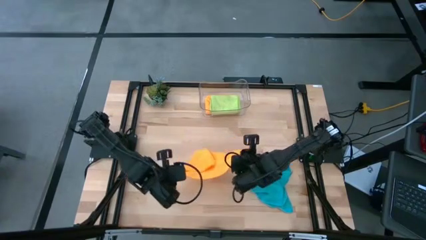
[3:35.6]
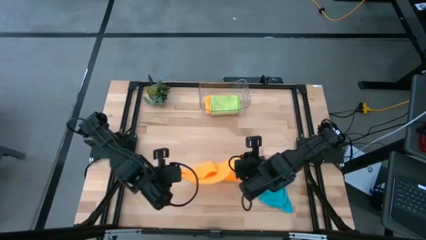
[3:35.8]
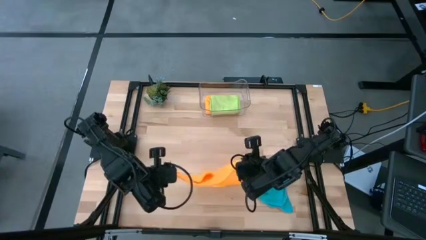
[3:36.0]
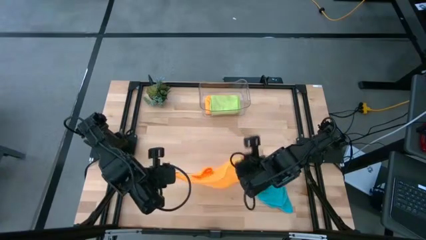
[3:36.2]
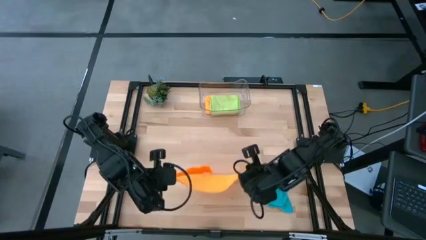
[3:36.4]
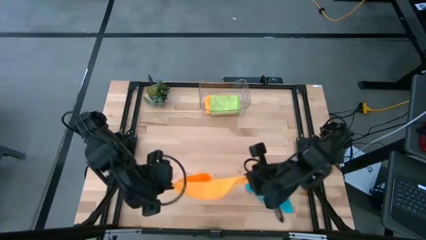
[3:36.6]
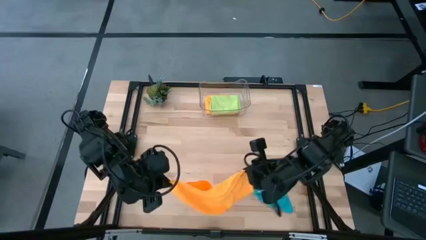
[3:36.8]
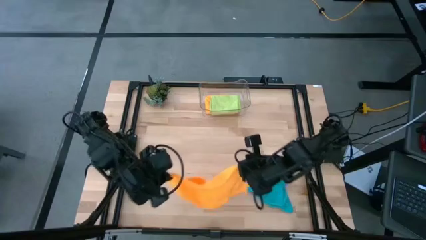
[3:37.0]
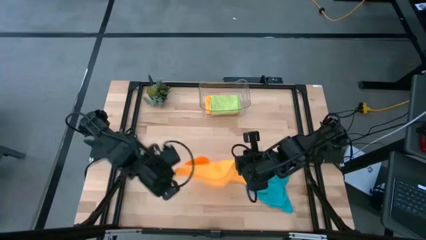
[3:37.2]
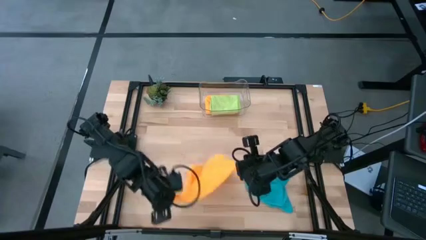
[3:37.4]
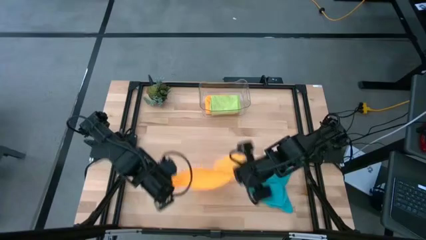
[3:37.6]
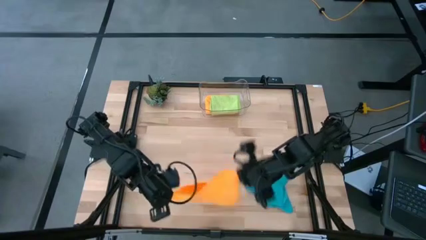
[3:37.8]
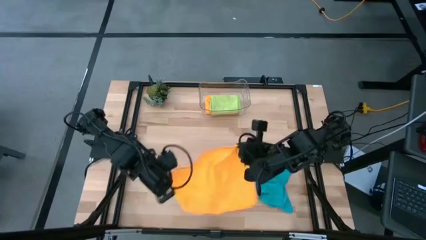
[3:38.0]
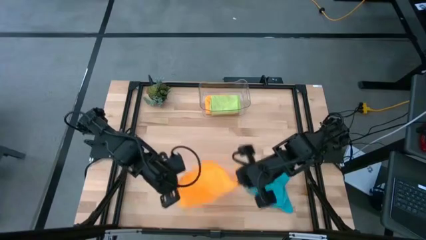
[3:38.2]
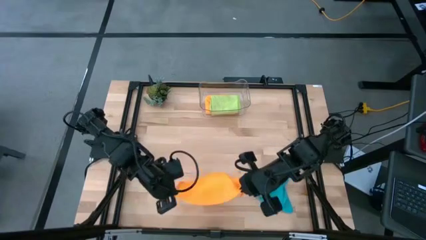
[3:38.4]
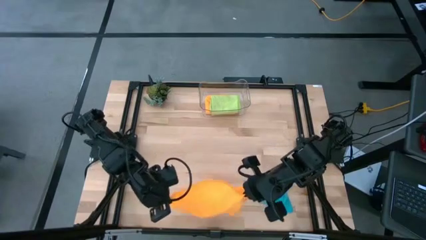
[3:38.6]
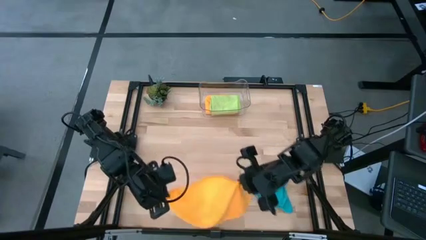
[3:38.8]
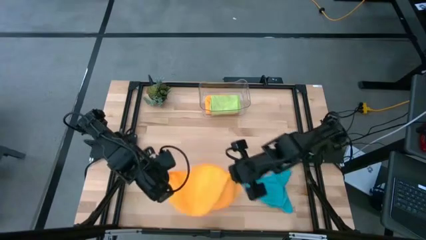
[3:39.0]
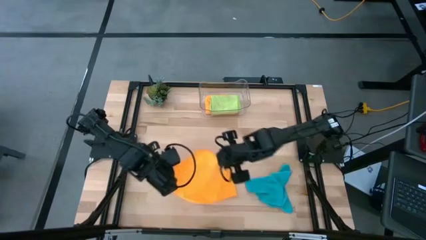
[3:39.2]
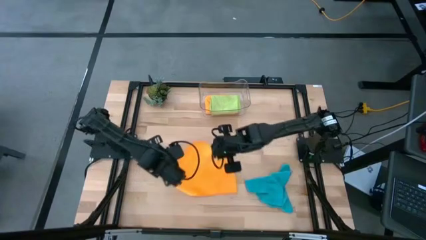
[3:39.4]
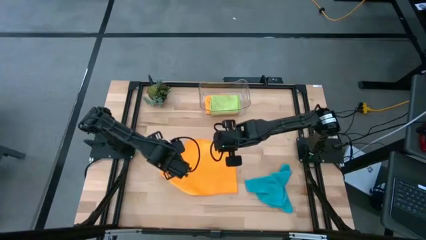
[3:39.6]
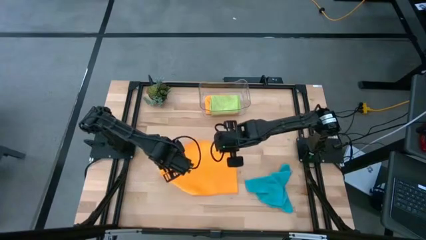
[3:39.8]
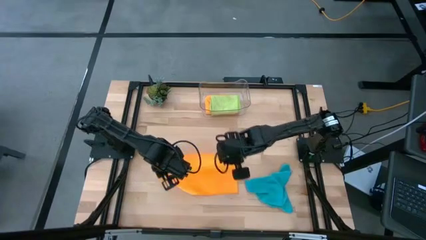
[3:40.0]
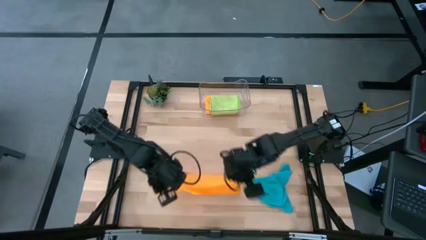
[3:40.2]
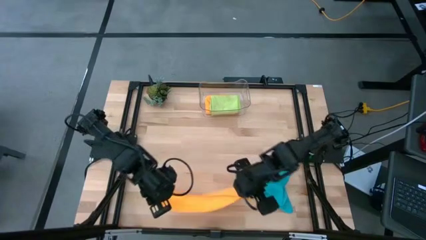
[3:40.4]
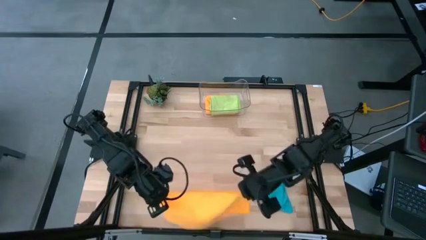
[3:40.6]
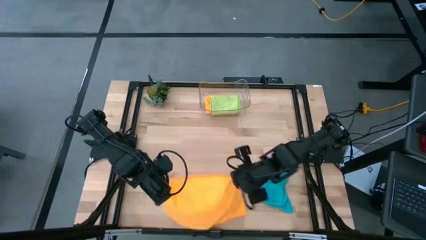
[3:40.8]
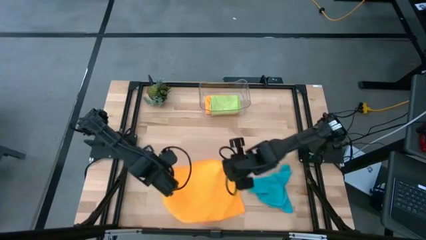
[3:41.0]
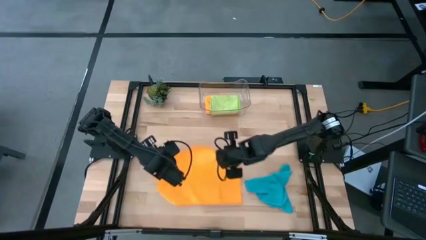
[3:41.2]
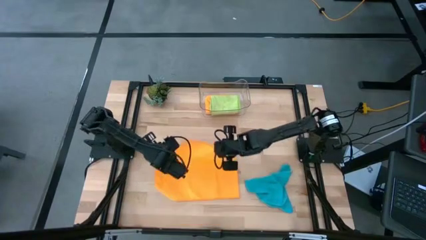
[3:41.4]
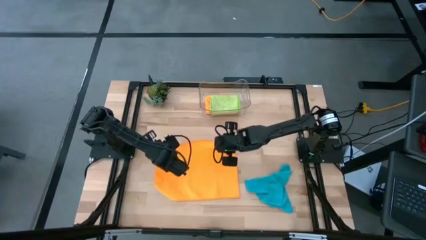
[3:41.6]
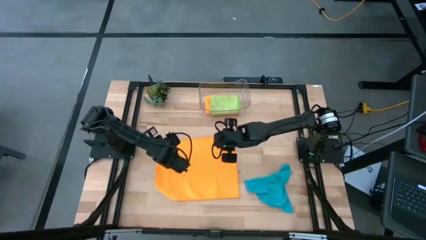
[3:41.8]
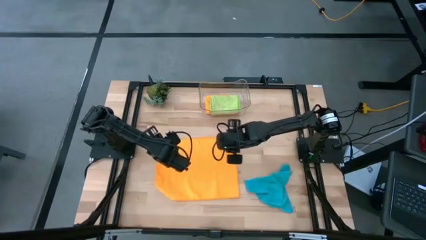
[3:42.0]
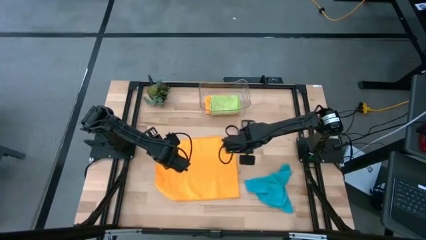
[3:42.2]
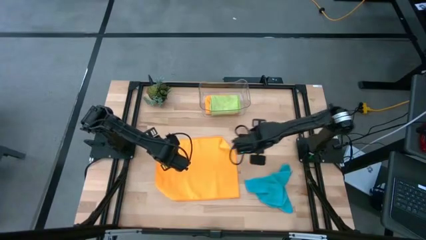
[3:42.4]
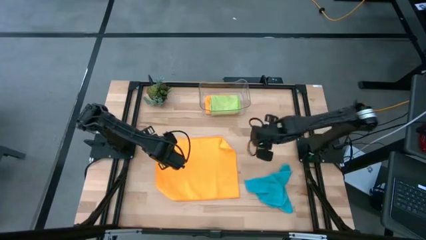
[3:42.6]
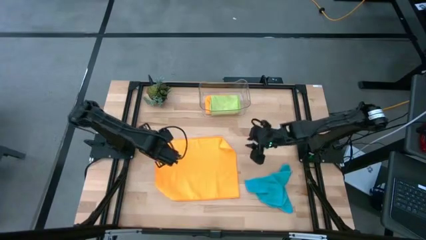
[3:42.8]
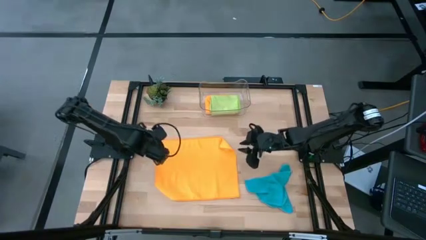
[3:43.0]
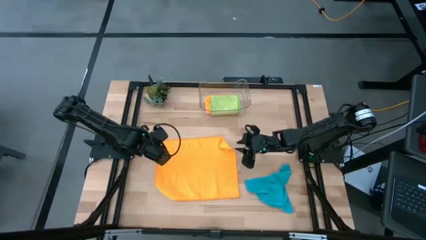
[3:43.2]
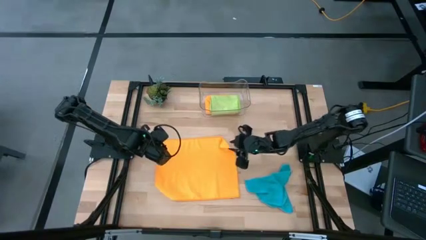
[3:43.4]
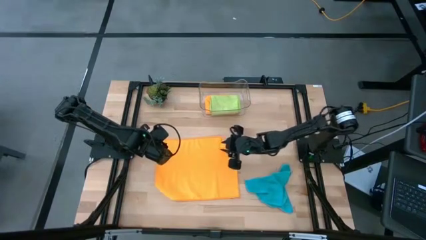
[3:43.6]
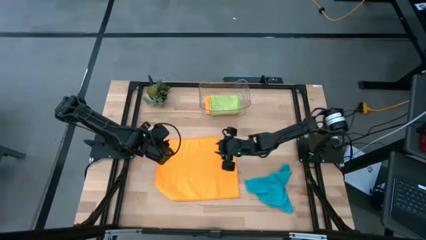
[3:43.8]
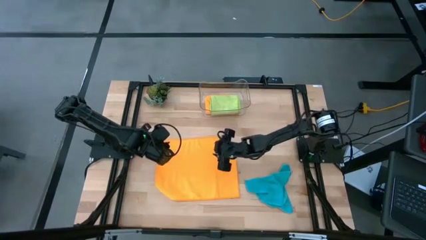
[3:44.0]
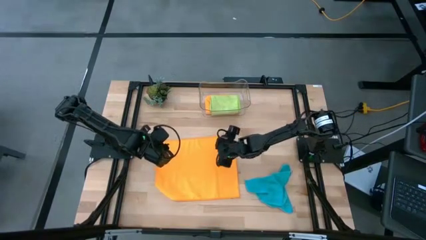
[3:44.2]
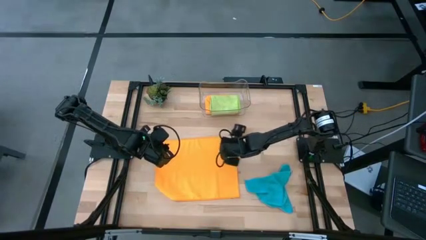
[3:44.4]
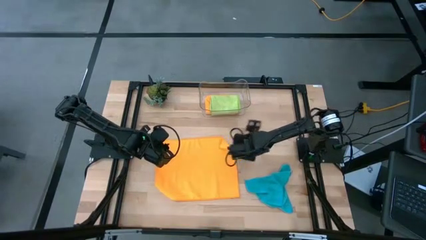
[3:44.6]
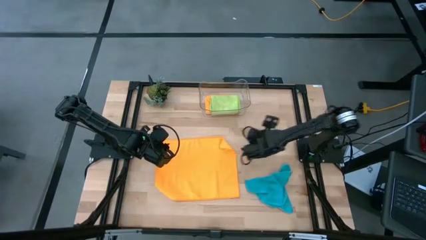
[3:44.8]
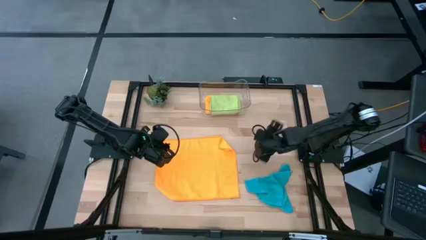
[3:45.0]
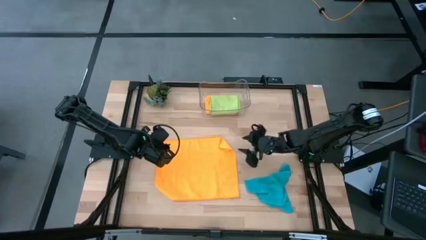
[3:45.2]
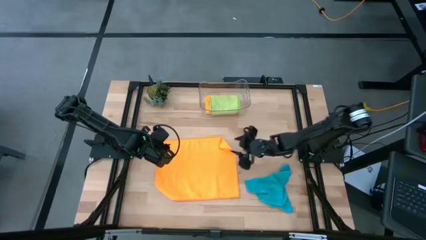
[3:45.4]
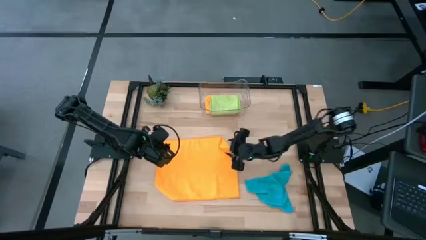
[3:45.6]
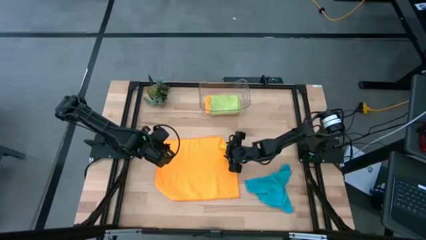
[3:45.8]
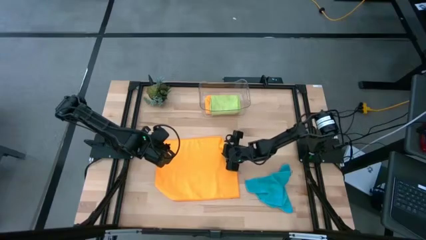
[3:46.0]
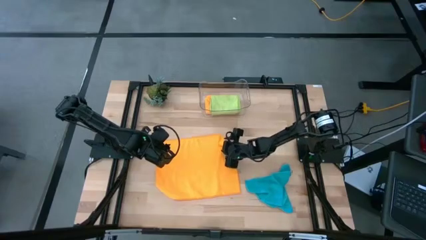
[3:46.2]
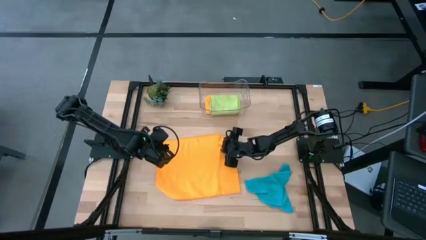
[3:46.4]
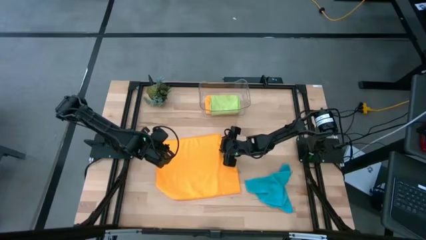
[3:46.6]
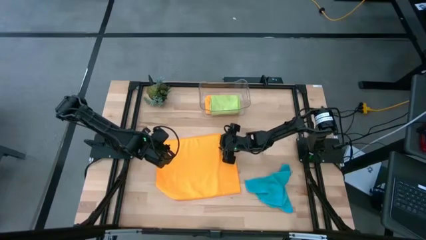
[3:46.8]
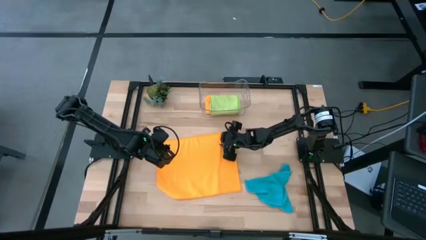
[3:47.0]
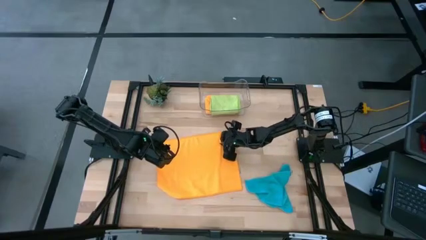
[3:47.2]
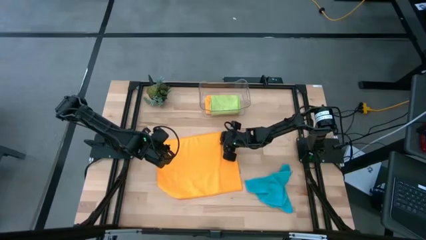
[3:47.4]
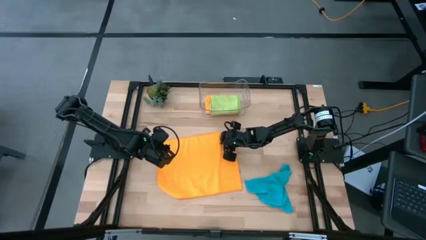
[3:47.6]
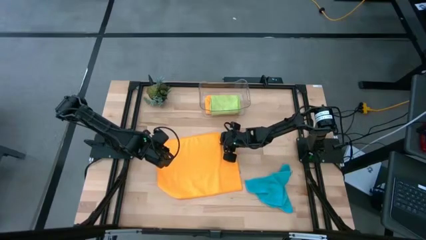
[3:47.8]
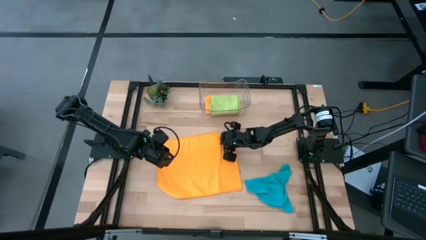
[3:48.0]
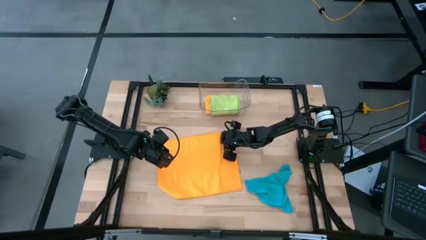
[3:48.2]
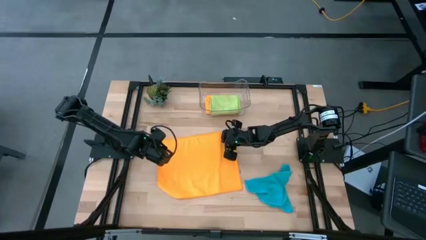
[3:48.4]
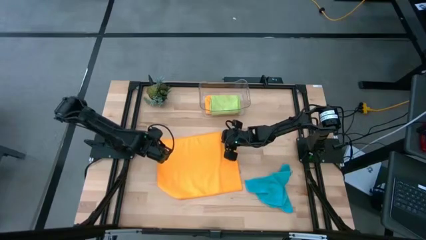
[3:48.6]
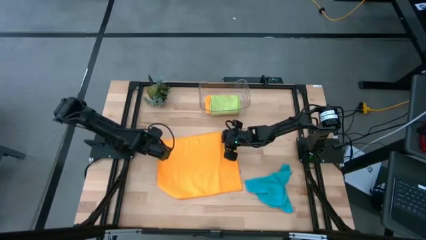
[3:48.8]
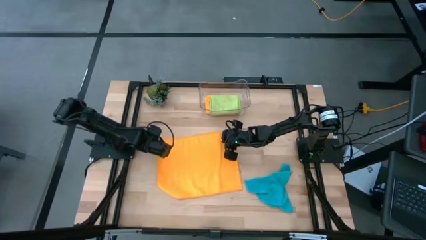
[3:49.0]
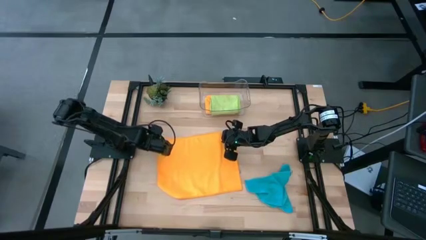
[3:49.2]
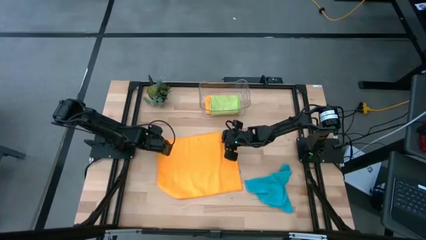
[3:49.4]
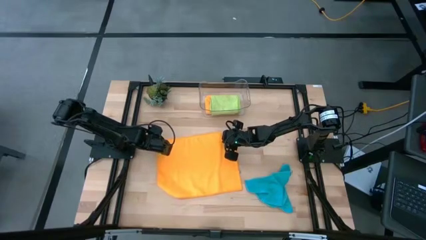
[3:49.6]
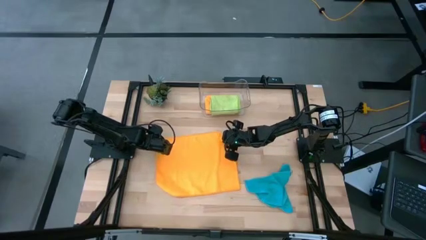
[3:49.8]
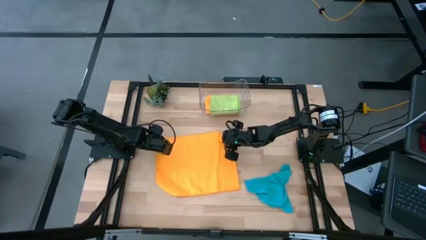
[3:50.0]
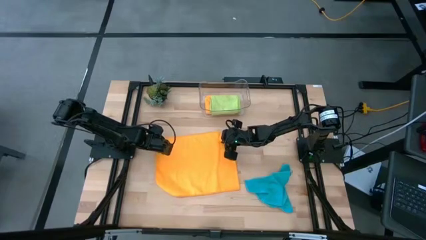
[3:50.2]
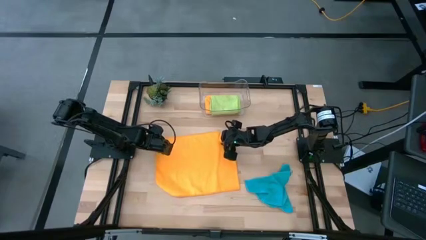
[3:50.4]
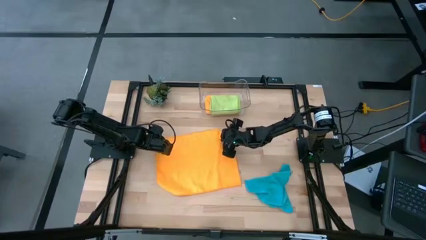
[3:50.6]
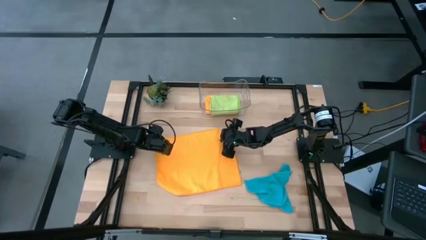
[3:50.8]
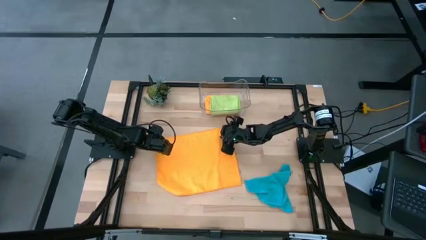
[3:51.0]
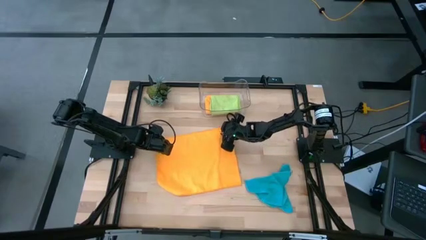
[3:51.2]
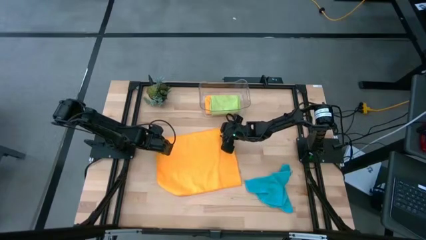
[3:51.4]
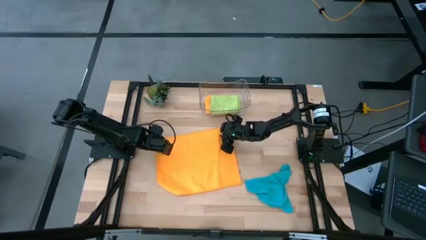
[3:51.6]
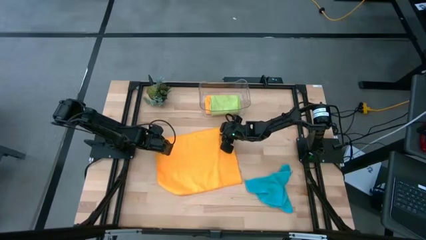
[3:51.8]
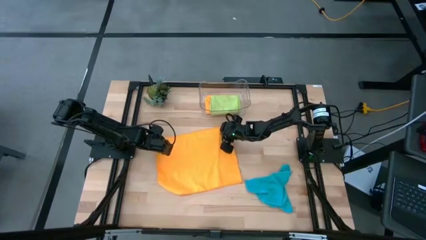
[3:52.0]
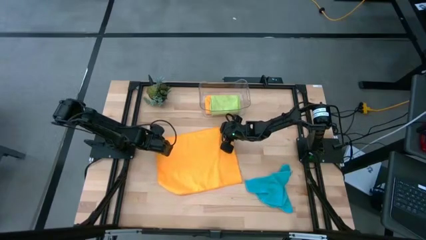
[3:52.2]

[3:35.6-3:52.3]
Task: Fold microfiber towels
Fold the orange microfiber cloth

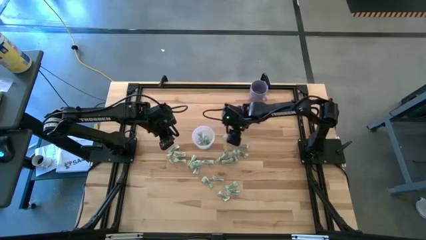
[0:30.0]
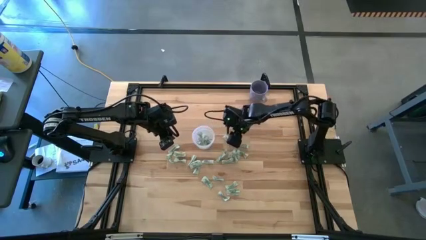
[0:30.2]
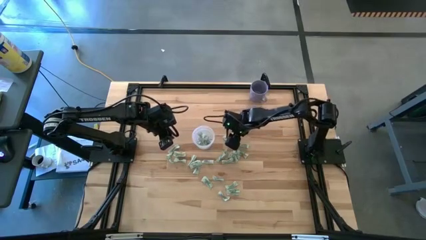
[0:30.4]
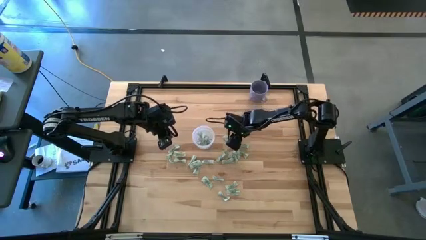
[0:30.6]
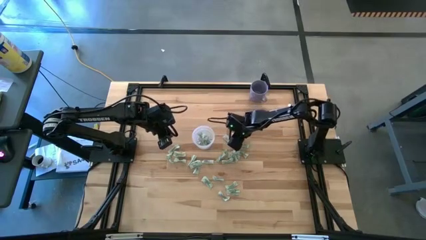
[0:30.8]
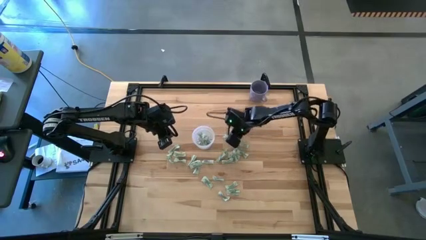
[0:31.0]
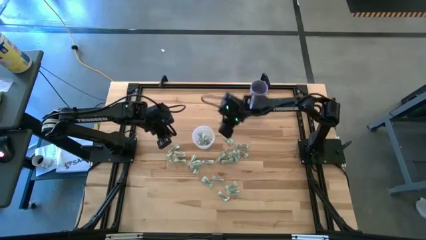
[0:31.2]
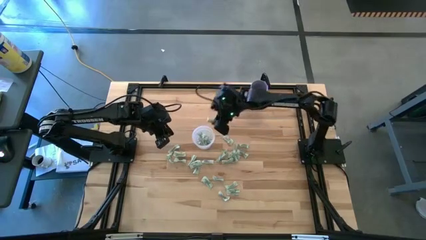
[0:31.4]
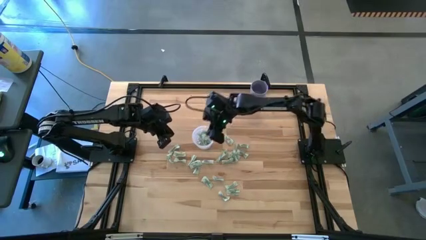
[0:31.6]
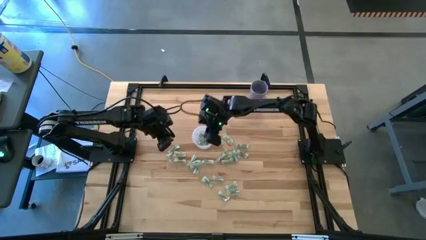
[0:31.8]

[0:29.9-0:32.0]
Task: Pick and place Stevia / Truvia into bins
Put the white stevia packet into the transparent container
